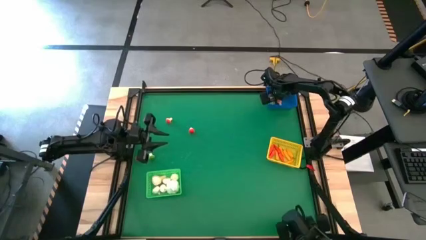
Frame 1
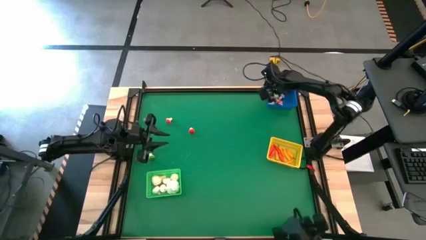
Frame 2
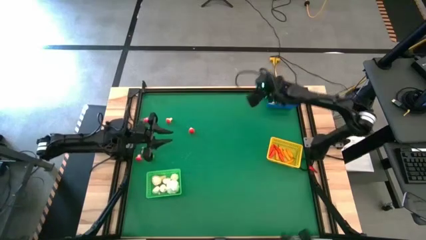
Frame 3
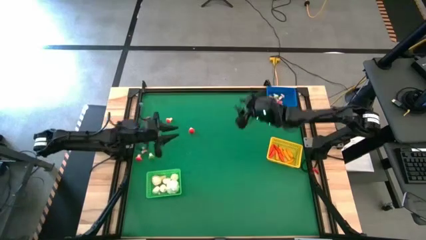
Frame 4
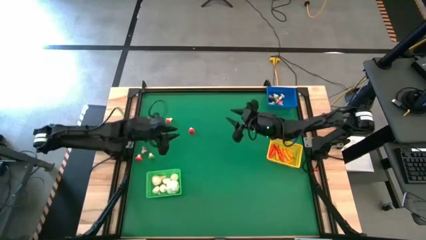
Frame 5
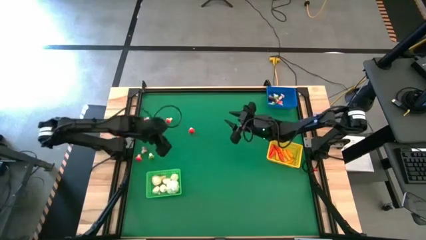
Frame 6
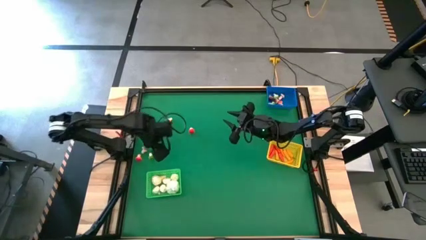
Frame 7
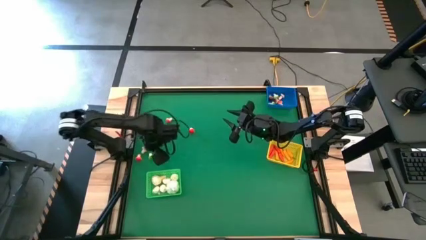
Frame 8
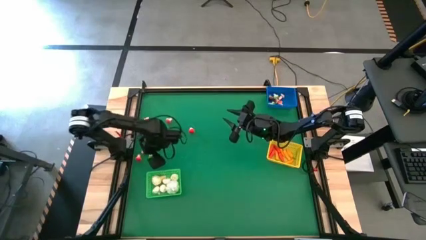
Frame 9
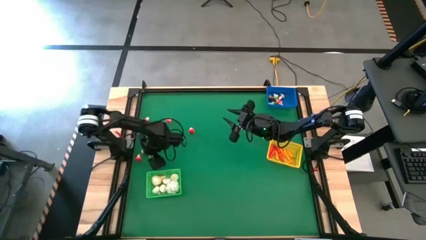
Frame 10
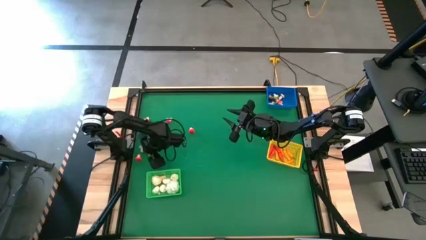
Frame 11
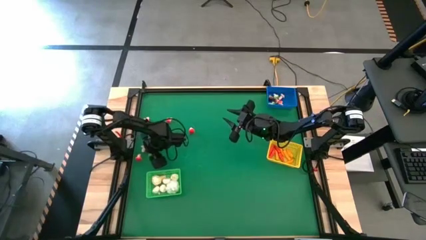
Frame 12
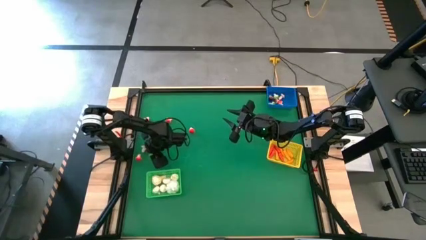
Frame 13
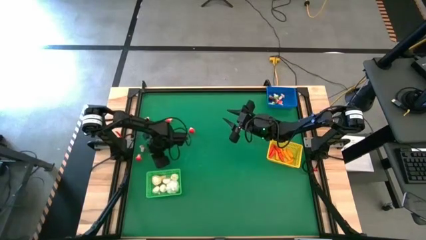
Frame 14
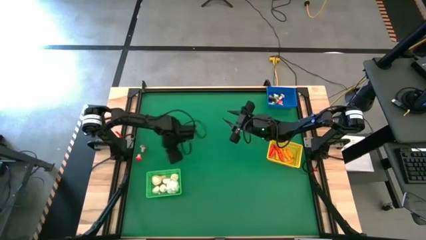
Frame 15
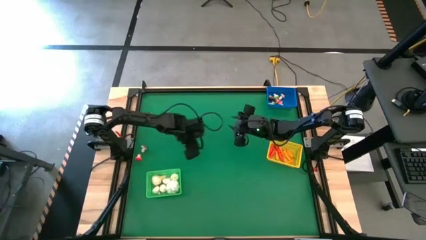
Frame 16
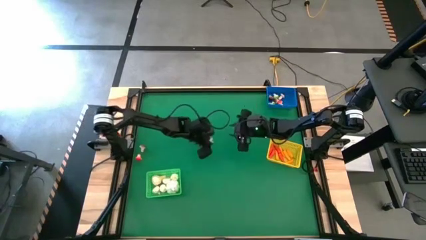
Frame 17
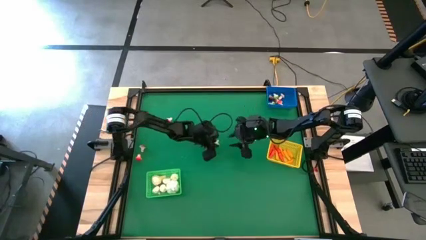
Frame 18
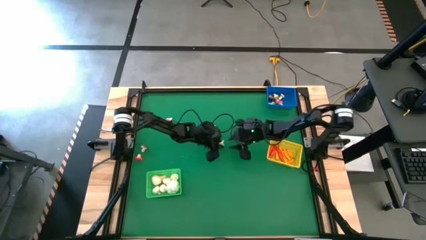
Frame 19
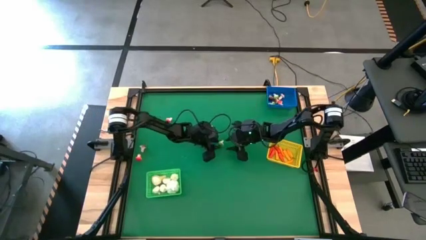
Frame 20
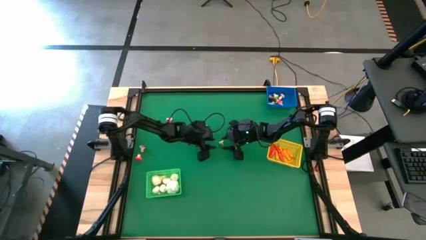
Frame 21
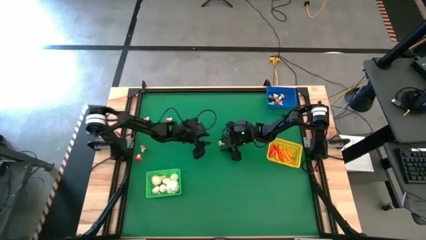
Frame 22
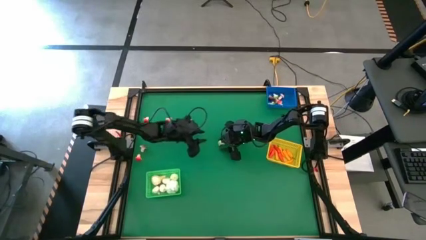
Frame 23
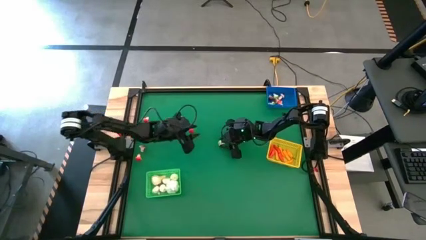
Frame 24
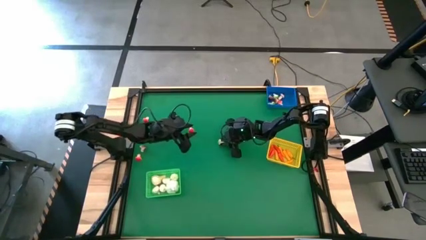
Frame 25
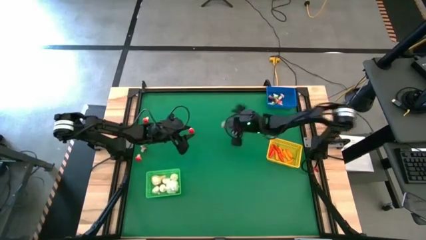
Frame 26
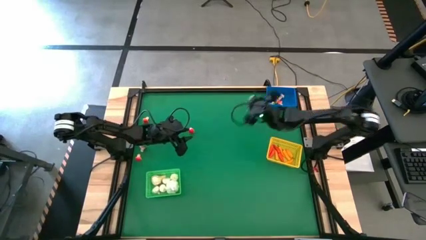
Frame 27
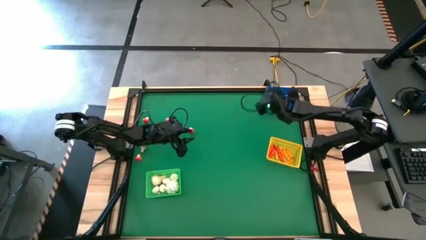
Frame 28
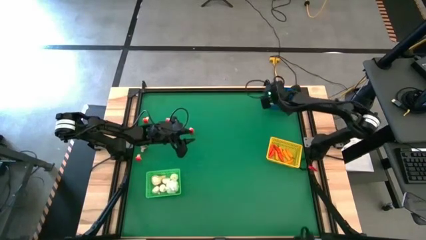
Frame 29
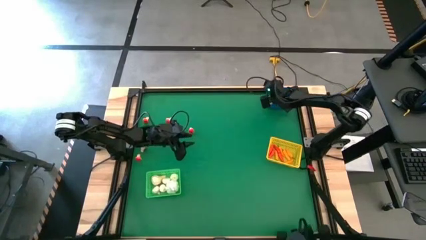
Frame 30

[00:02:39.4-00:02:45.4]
Task: Sort produce into baskets
Put the green mushroom into the blue bin

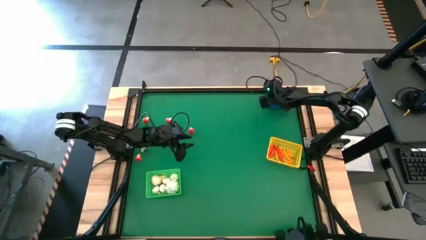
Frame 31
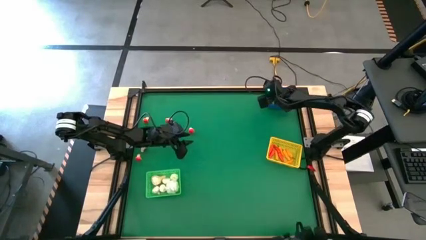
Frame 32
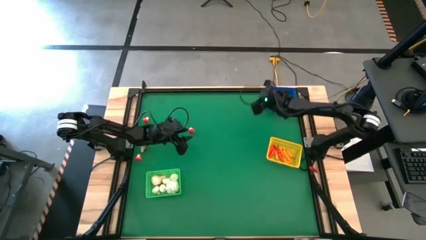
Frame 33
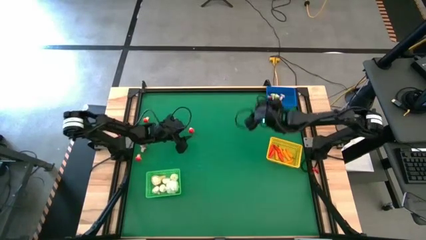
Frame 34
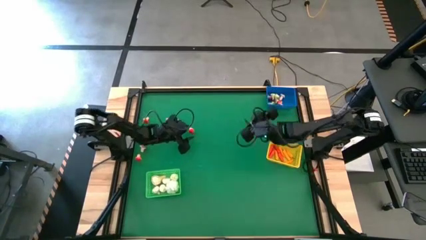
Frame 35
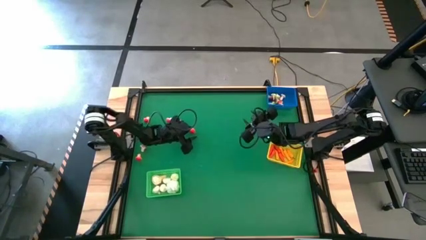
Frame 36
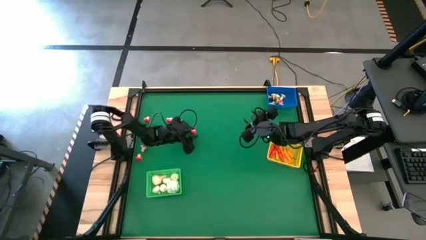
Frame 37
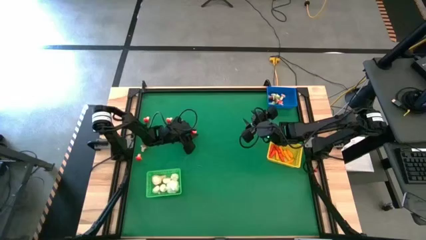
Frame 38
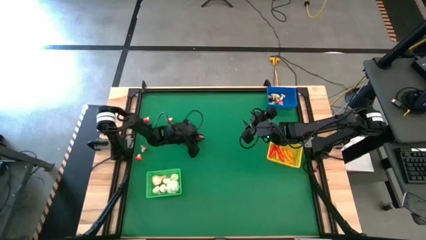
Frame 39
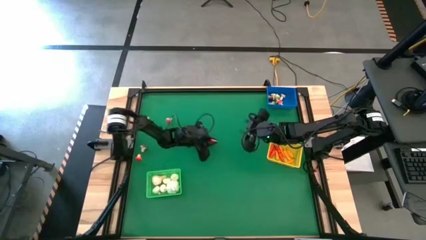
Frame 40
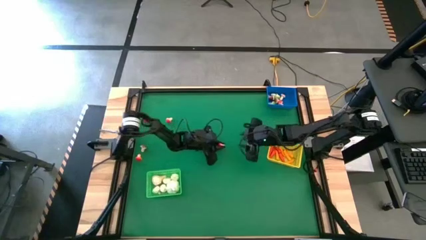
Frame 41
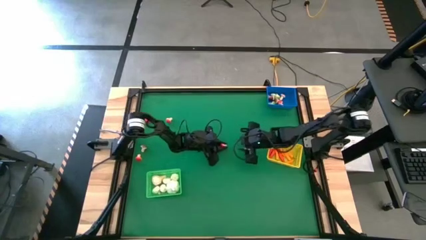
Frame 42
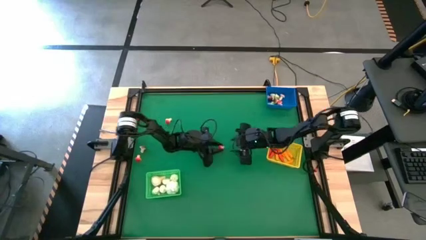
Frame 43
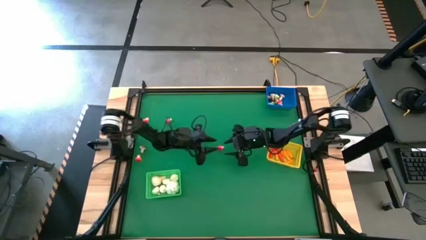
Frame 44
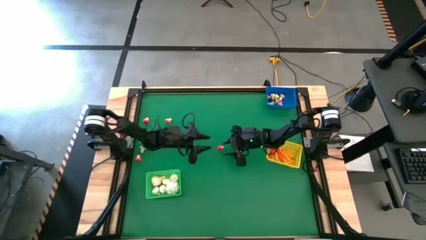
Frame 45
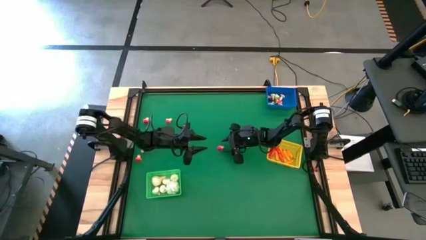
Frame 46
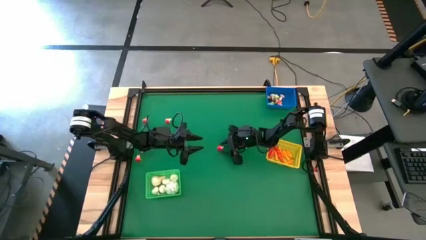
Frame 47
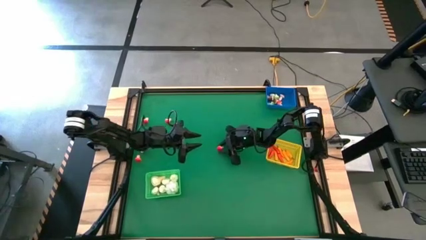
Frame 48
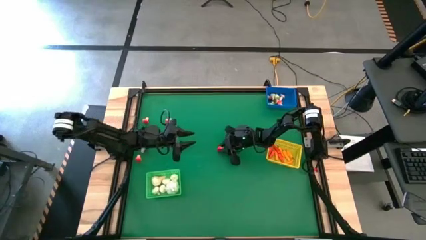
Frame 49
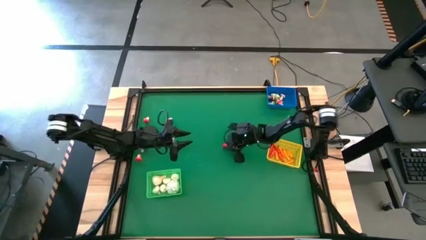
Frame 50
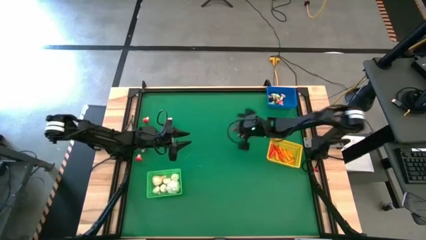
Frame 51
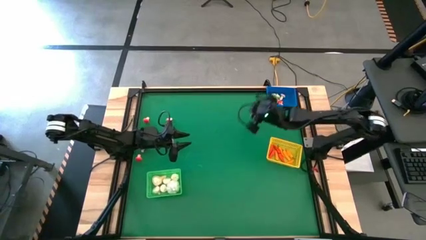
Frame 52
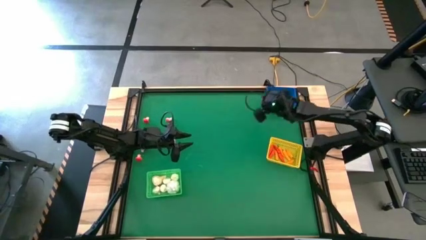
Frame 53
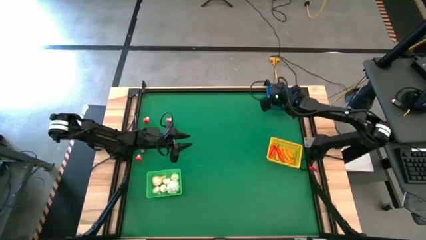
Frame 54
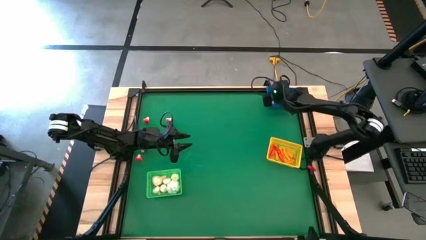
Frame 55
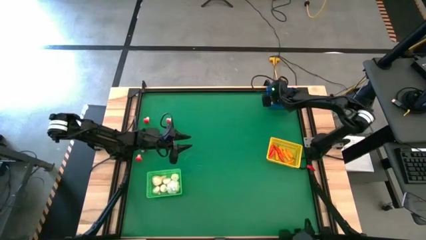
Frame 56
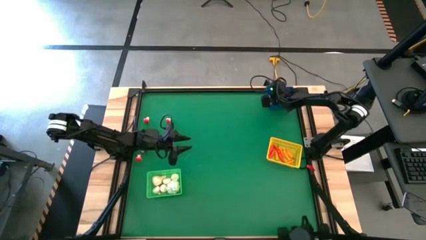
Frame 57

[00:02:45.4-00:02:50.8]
Put the red mushroom into the blue bin

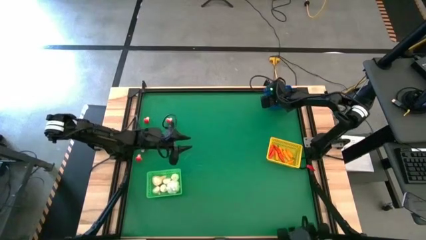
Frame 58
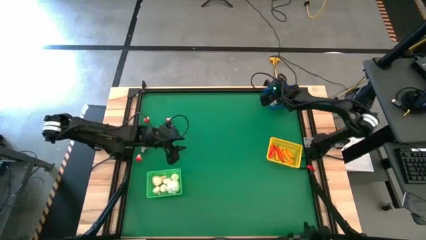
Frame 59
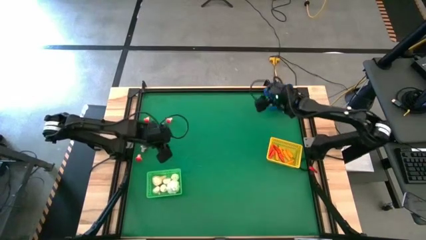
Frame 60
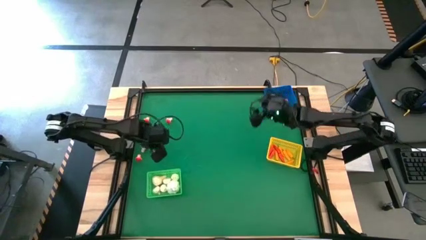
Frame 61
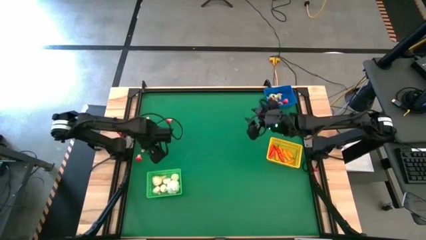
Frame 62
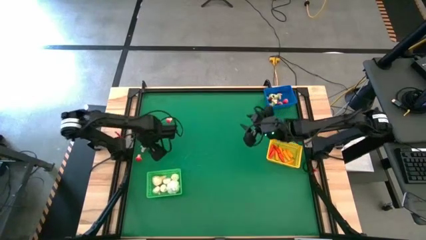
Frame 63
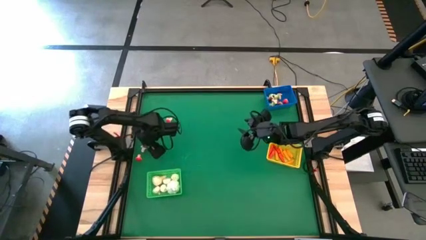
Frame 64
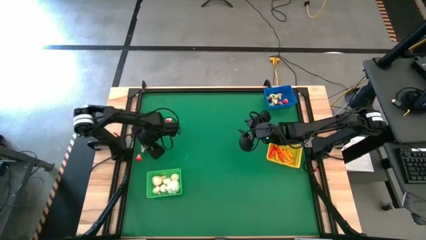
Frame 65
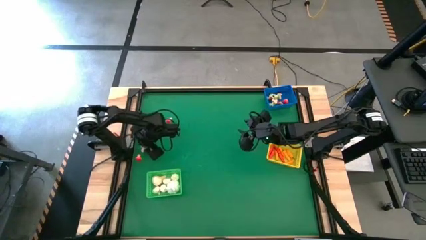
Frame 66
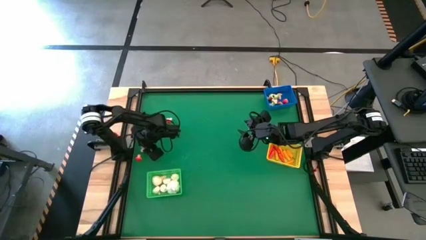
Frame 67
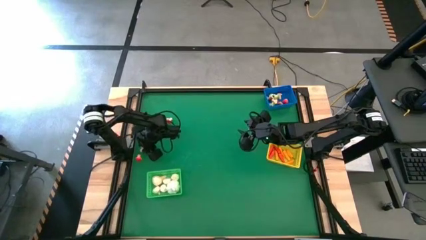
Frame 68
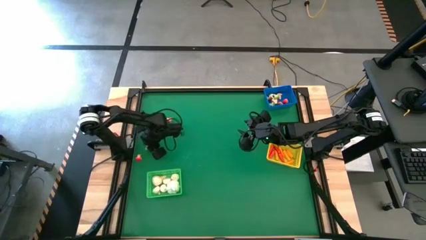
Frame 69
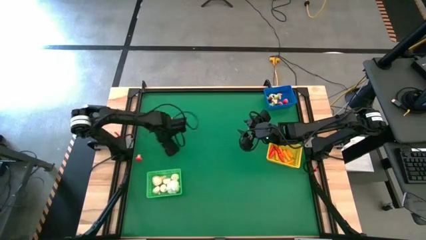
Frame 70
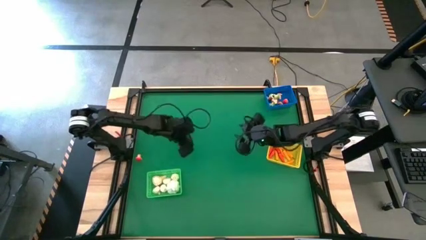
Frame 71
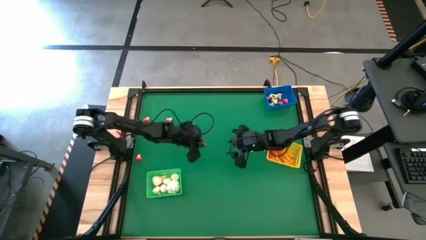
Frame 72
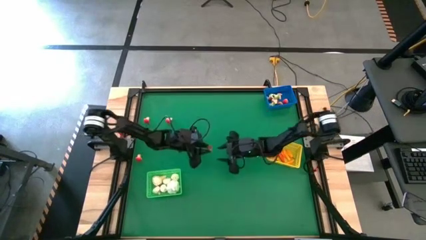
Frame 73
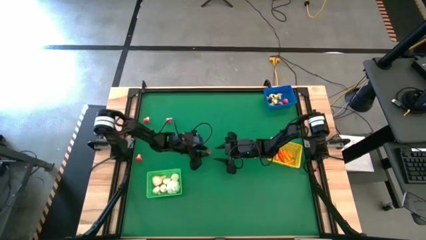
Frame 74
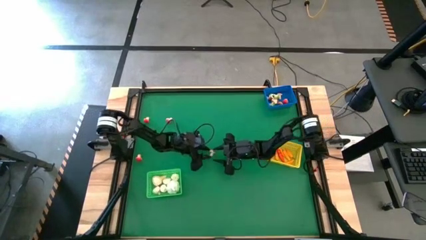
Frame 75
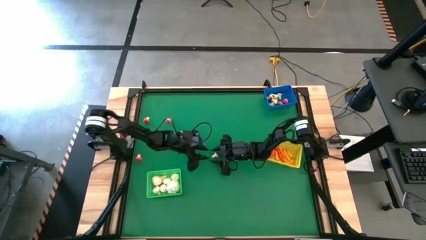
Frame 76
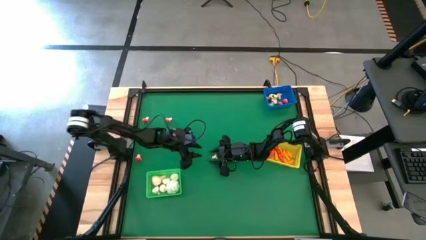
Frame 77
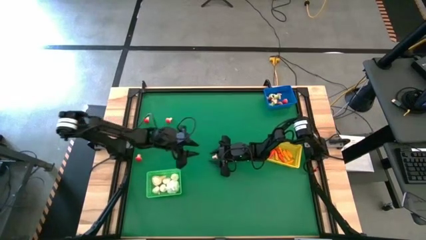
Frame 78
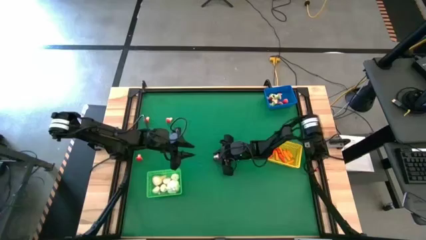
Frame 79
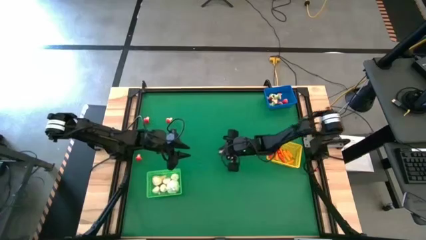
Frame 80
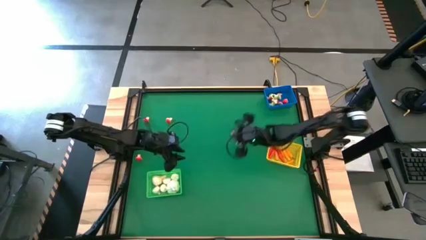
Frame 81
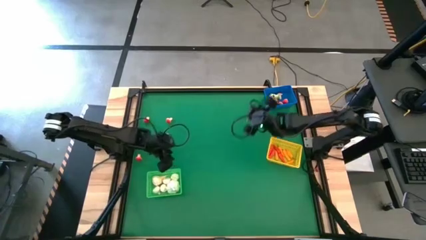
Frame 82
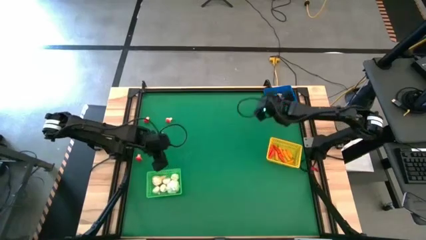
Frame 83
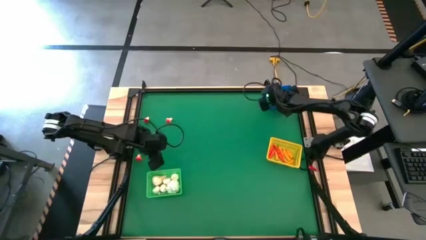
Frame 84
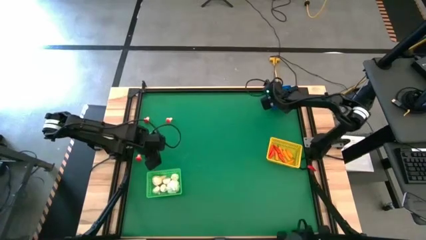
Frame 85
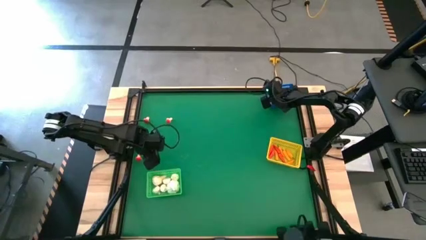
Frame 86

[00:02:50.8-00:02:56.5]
Put the brown mushroom into the blue bin
